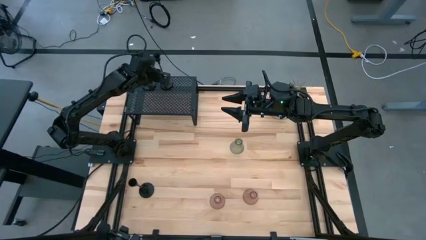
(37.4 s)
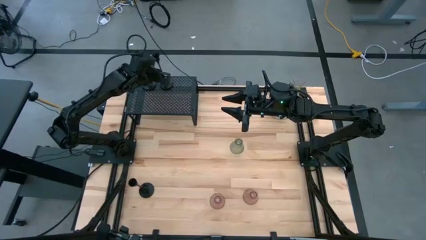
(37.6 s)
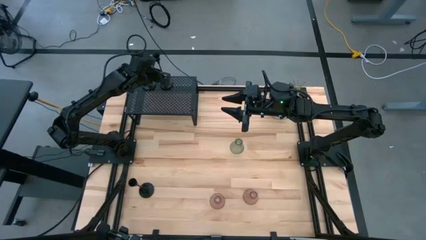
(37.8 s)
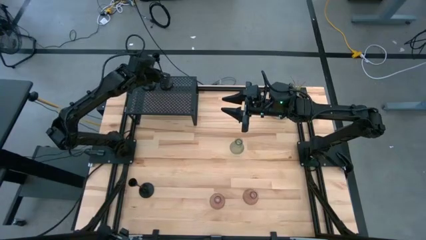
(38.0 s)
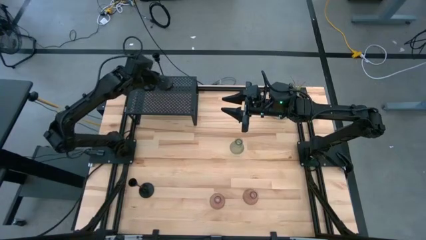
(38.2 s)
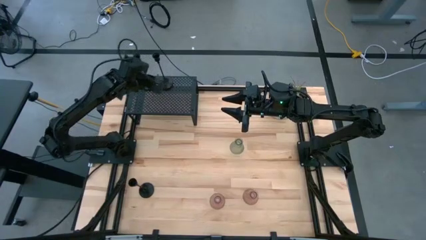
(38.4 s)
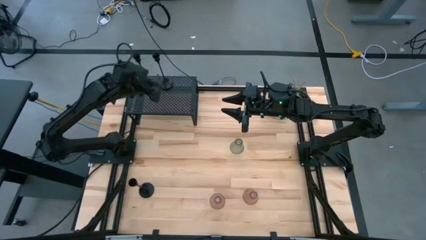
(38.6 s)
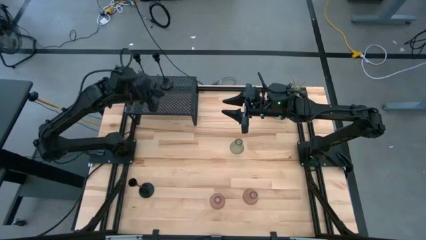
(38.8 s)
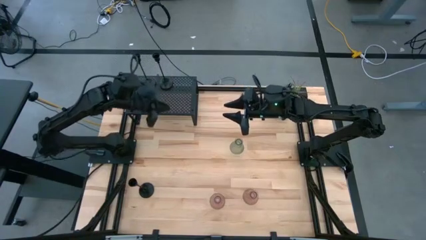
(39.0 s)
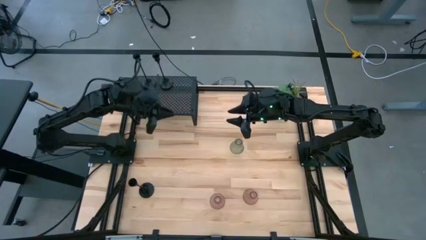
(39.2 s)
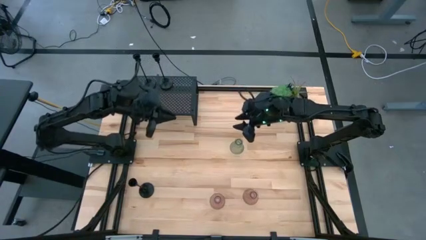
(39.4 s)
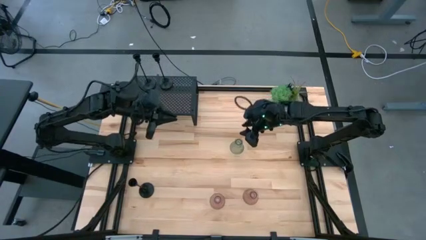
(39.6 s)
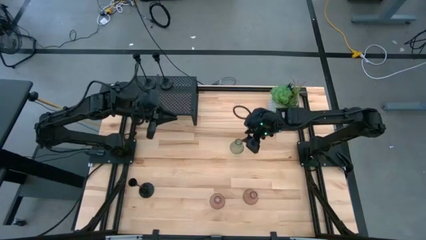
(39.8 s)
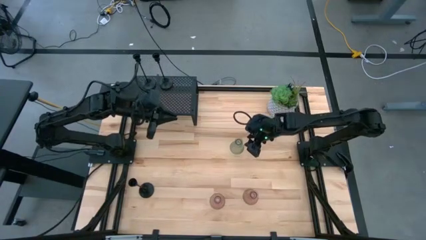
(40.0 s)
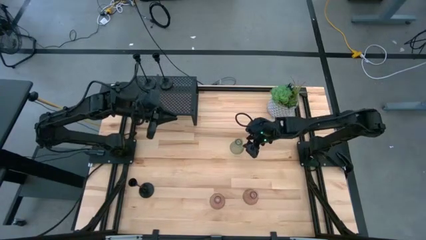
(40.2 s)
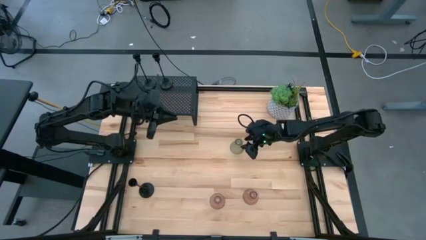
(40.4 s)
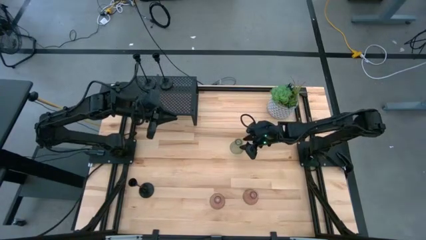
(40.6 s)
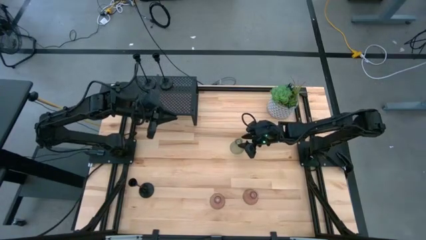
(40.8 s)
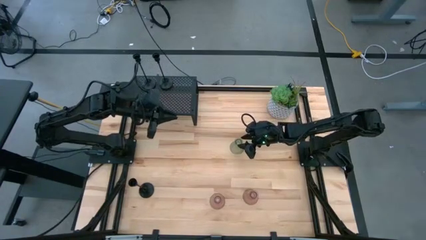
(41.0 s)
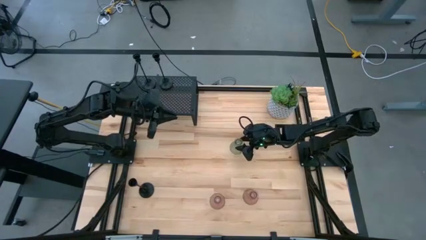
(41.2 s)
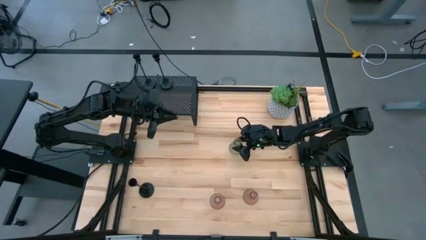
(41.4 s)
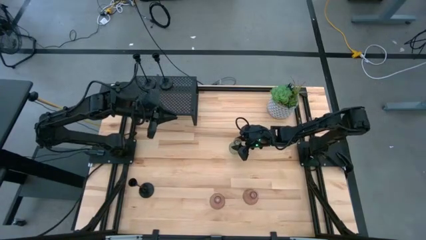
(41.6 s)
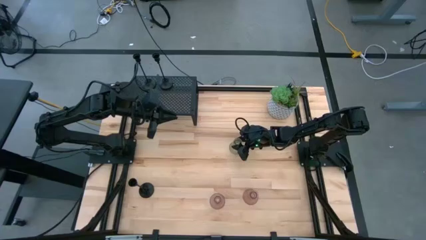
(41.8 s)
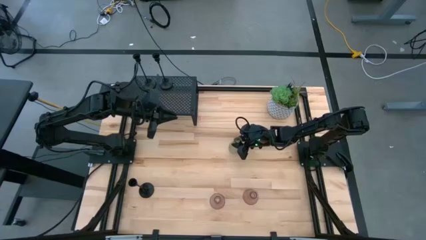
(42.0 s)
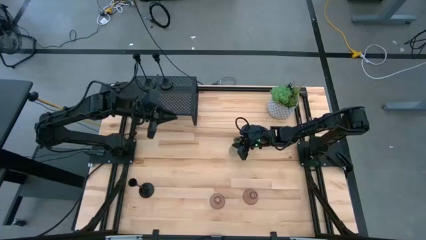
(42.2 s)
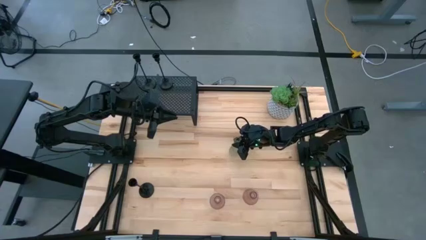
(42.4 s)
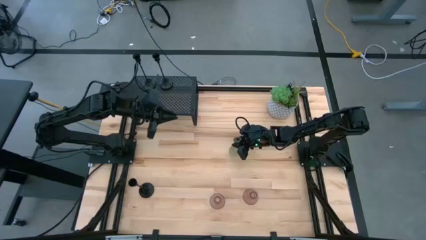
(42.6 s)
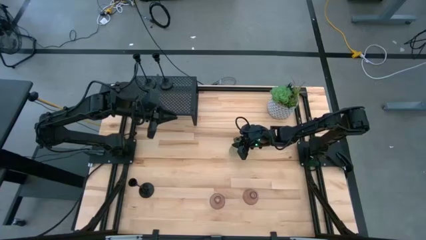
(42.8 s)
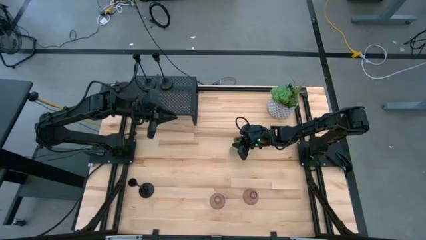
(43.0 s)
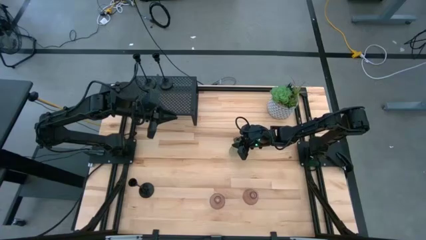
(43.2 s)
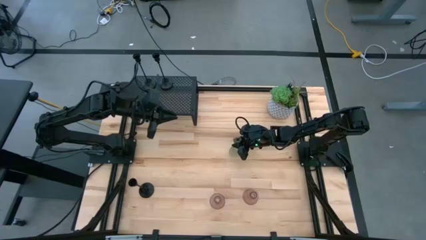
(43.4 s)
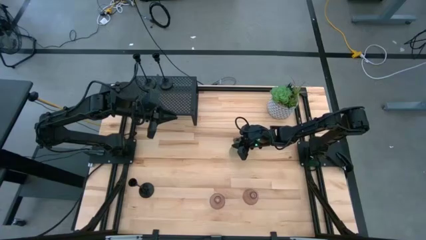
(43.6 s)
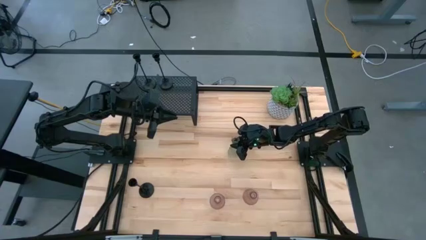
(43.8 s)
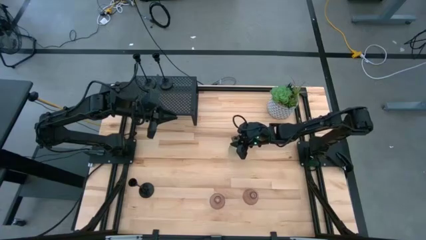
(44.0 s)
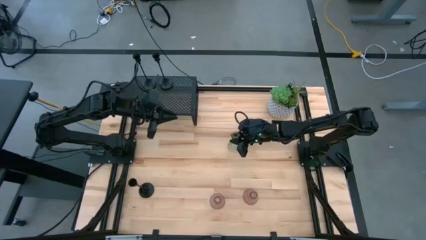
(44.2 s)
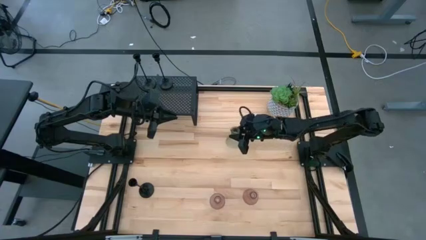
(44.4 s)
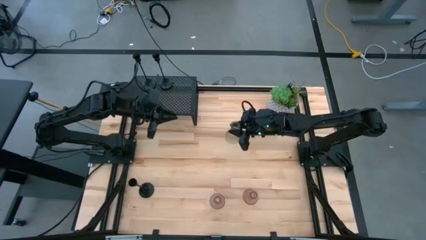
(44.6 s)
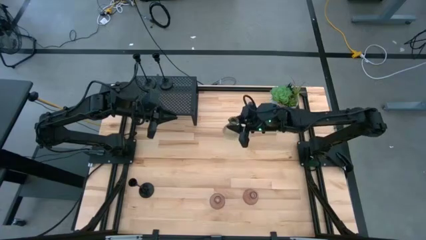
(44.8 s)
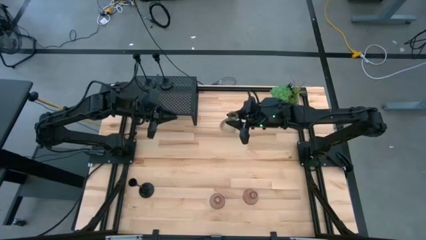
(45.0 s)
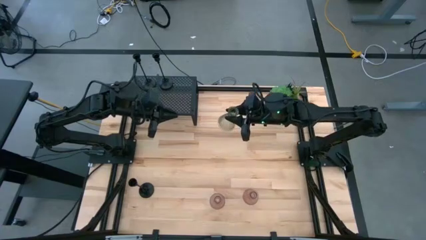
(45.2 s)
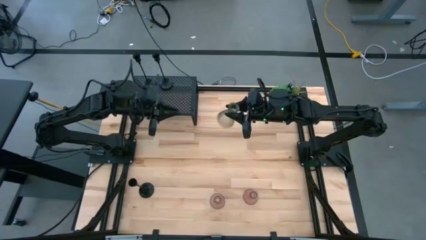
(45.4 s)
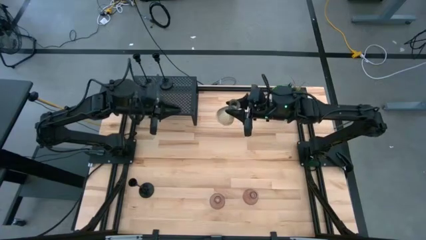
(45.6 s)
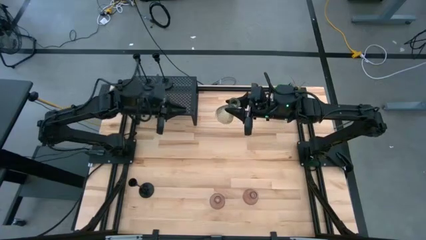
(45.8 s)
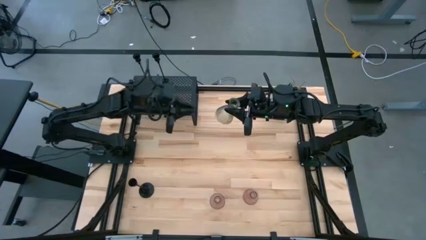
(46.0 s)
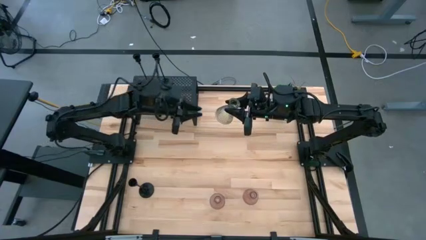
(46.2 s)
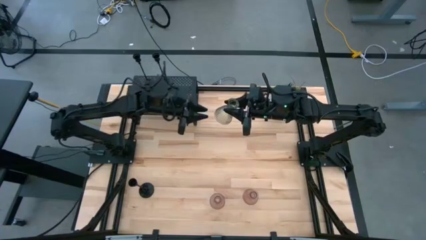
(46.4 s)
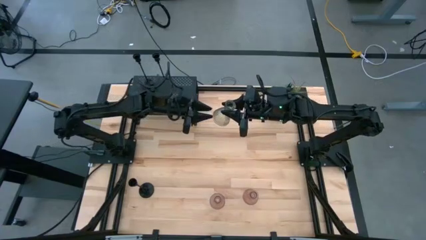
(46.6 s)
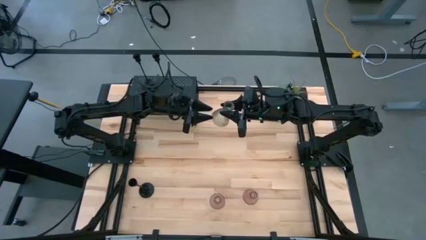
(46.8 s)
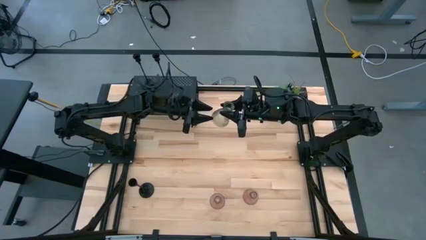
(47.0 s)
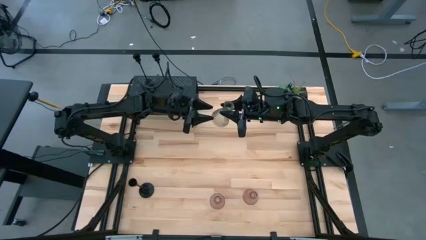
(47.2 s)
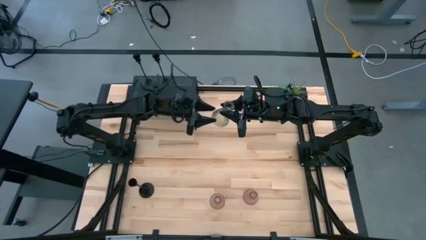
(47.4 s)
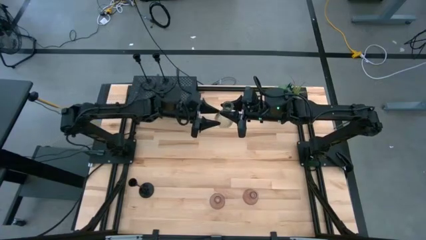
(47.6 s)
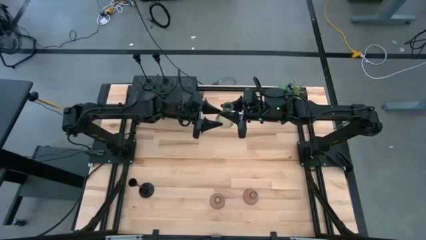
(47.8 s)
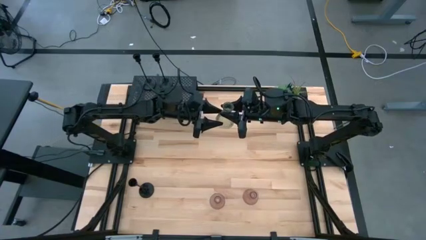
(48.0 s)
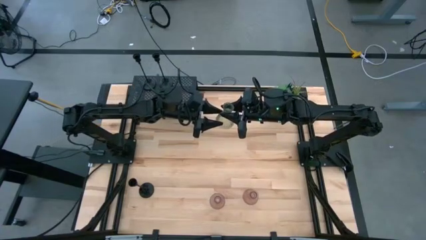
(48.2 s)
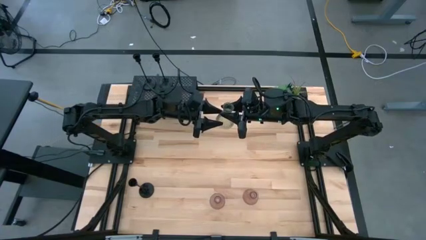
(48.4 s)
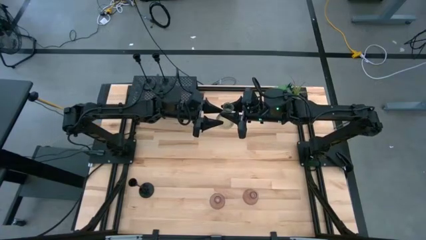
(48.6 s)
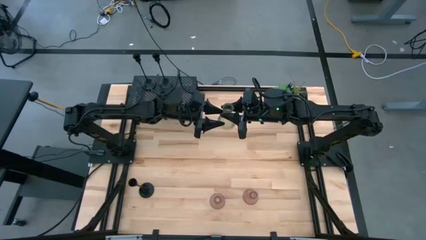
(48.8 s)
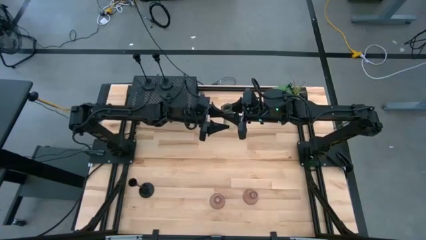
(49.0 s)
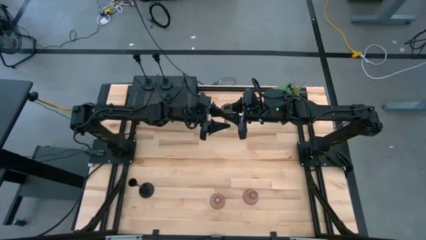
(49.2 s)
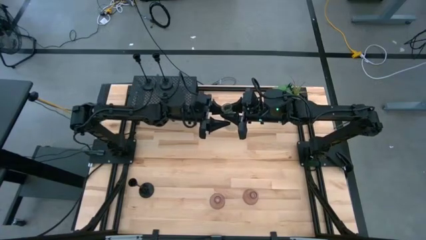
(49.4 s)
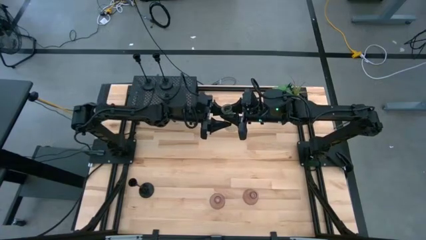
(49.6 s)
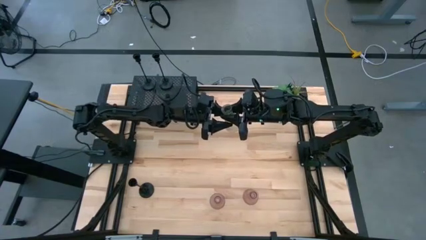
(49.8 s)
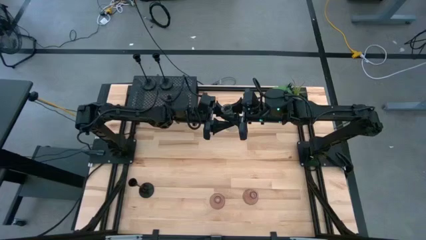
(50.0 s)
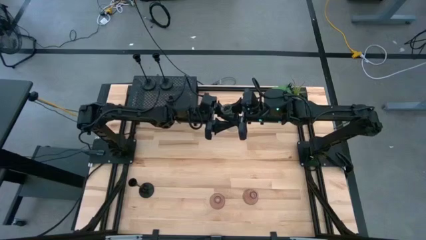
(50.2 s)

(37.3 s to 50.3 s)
Task: Pick & Place candle stick holders
Put the green glass candle holder on the shelf

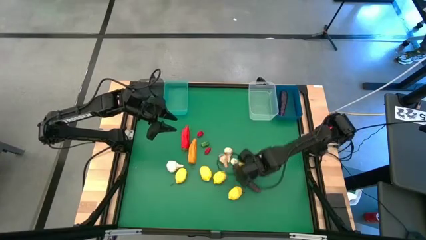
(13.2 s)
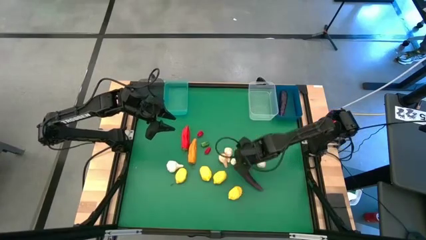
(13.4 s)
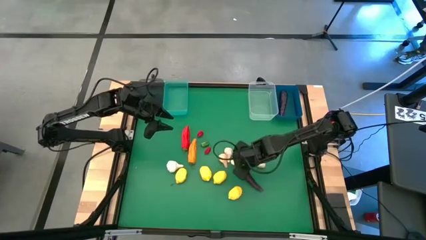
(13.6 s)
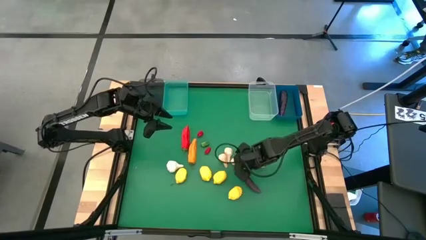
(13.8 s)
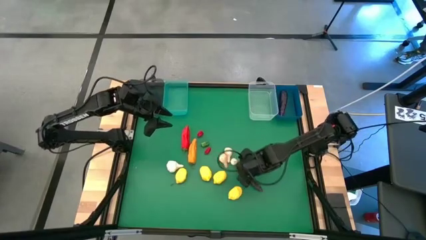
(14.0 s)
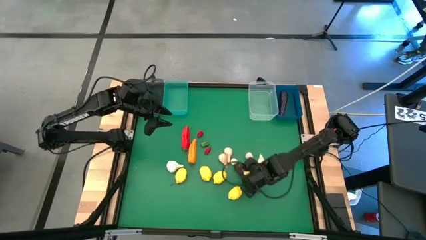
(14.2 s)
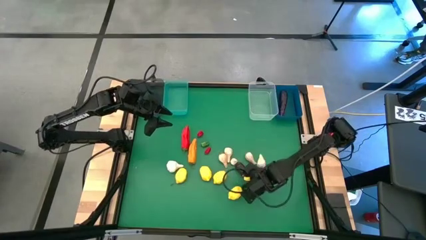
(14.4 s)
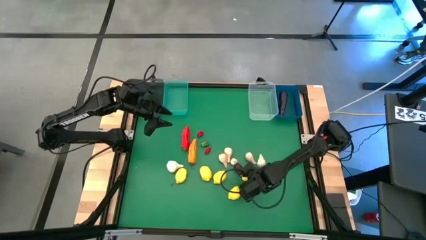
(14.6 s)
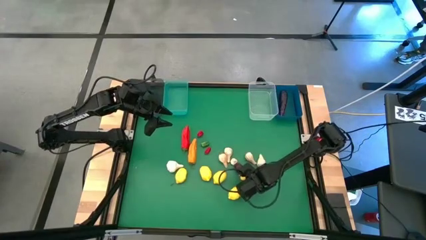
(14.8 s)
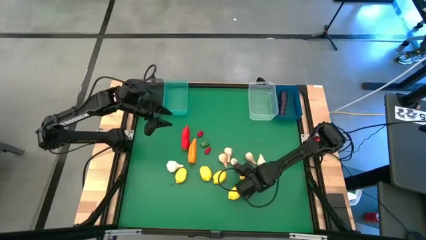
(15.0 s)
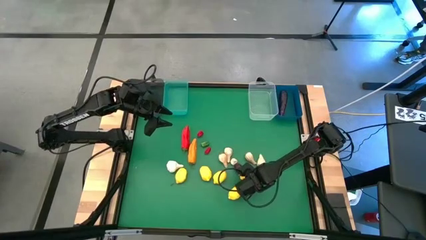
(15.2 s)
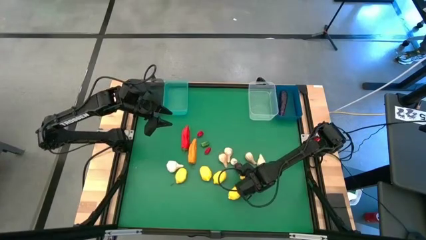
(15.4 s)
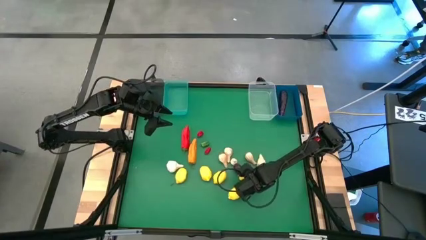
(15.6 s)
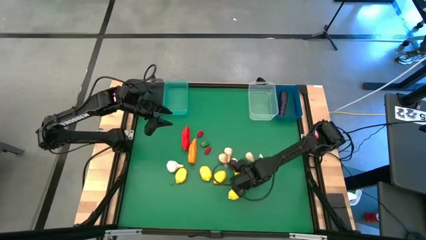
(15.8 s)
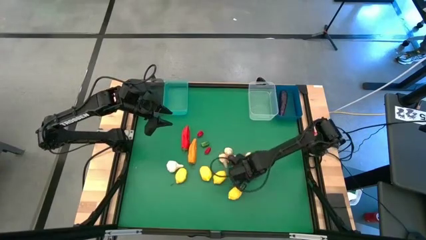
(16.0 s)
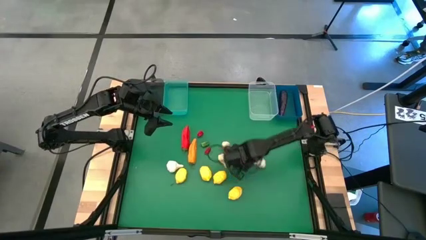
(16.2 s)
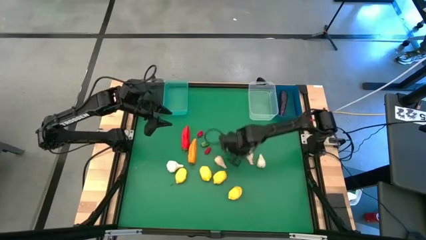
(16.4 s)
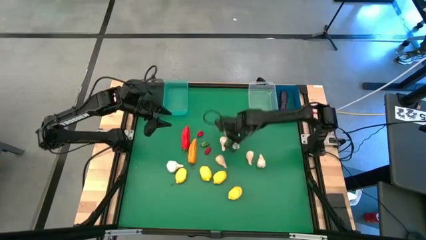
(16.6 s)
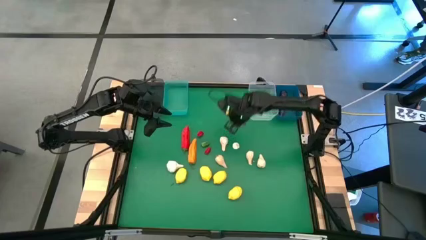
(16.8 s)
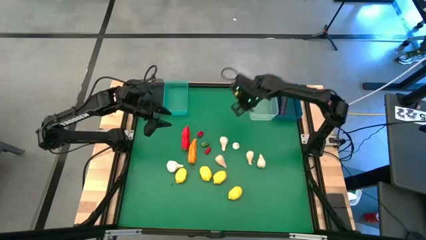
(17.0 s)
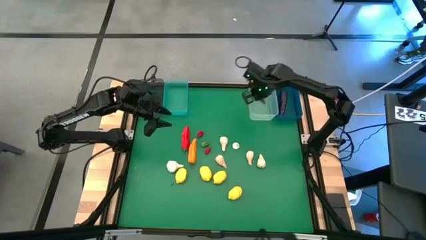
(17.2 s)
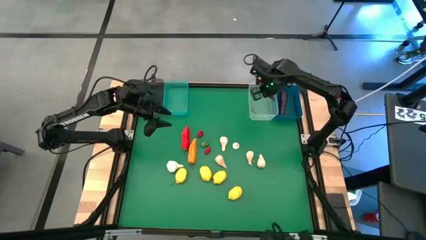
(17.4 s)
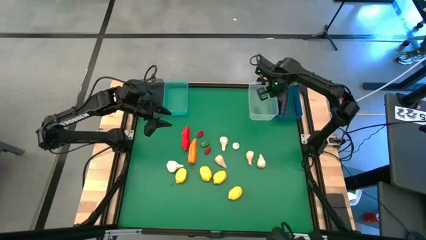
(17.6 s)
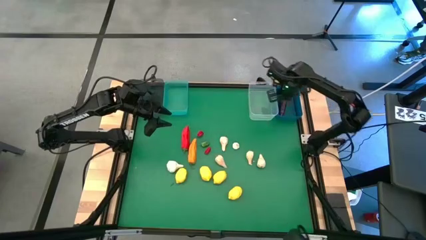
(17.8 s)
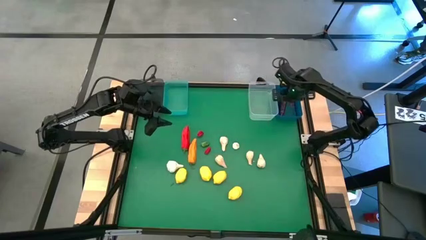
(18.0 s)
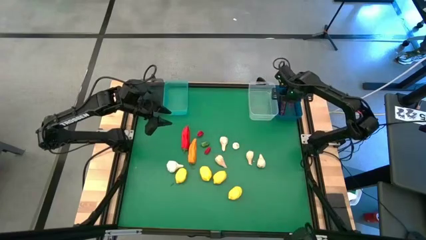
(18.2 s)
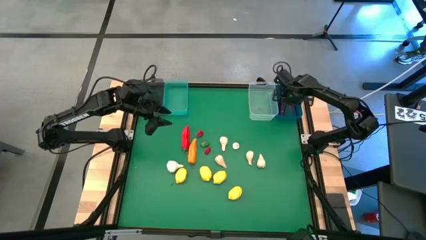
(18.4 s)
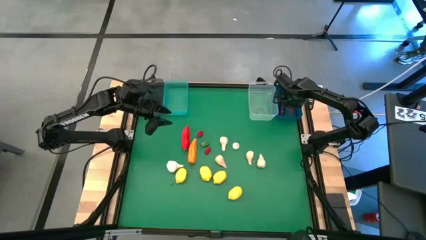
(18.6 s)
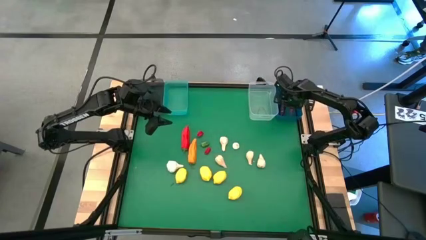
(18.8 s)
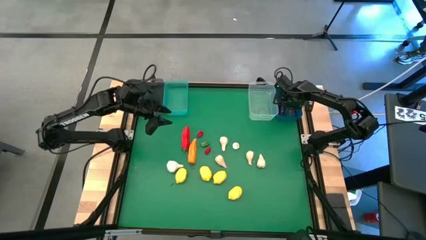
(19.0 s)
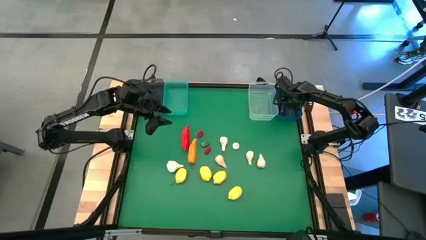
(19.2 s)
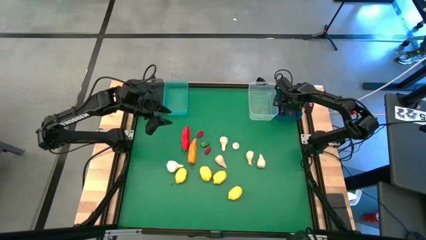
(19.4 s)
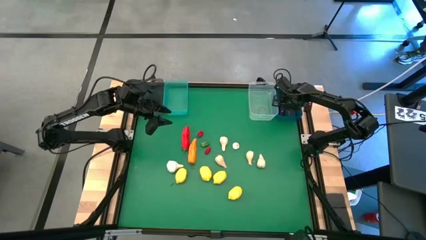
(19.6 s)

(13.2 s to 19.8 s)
Task: Sort produce into baskets
Put the eggplant into the dark blue bin
